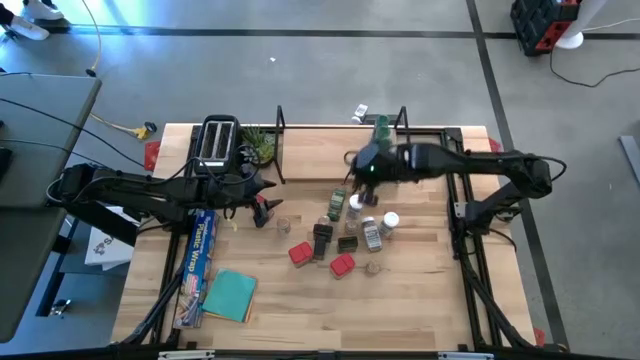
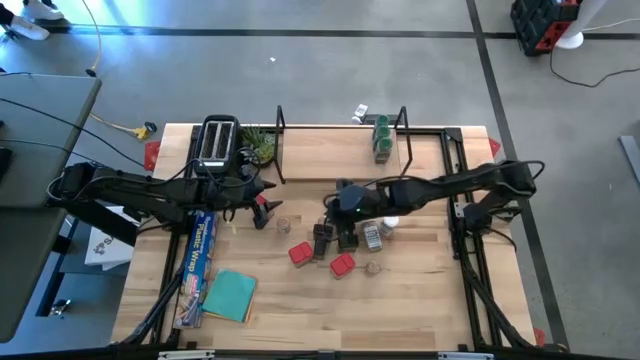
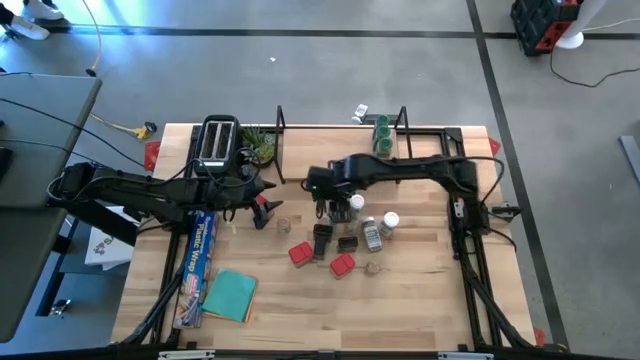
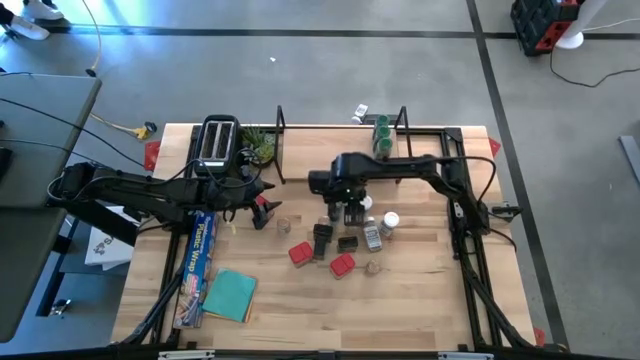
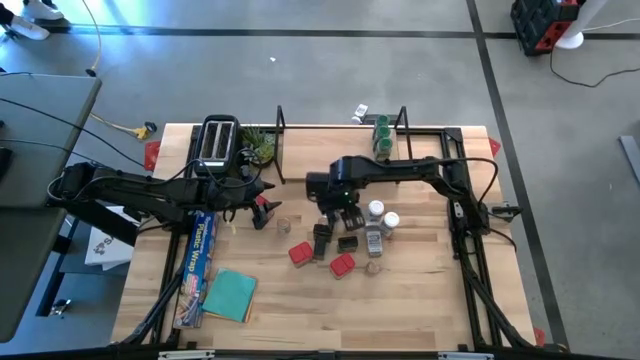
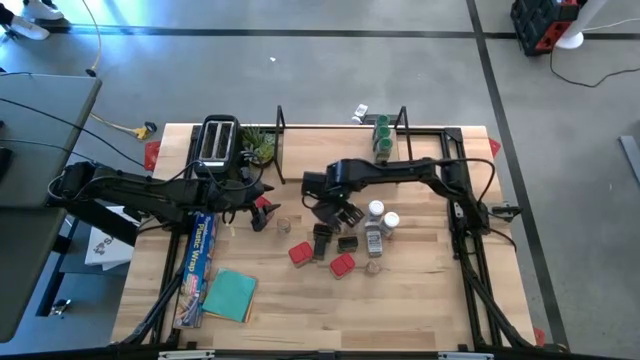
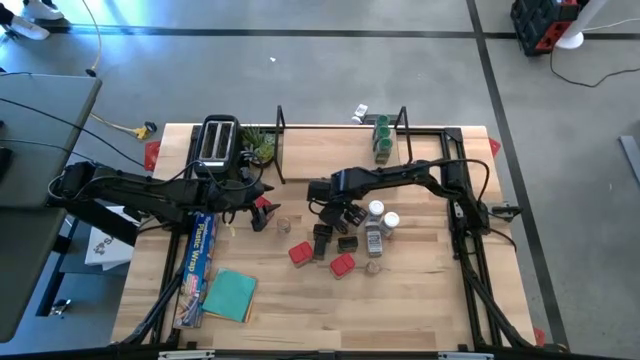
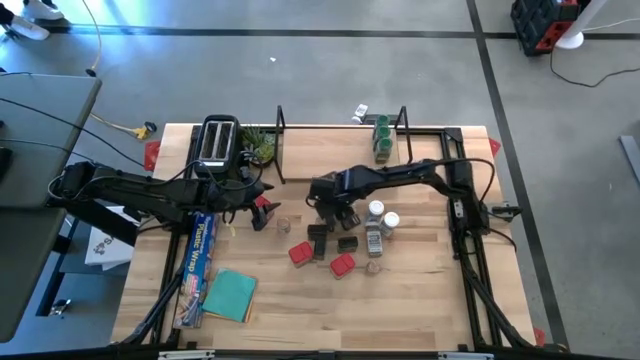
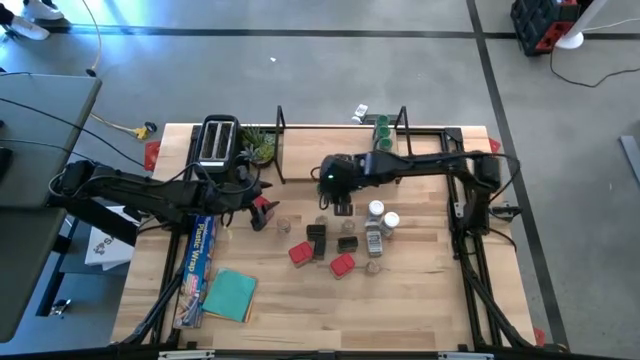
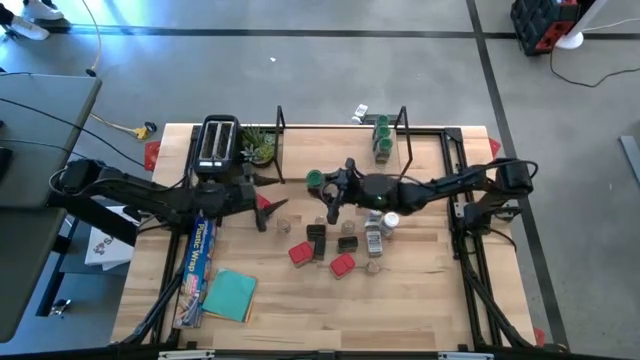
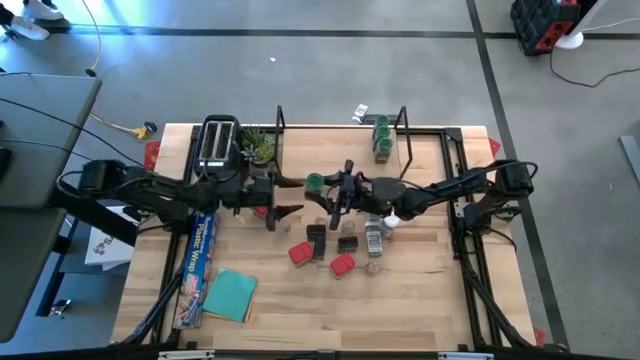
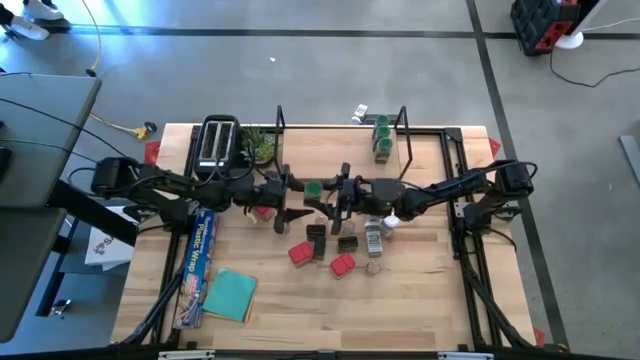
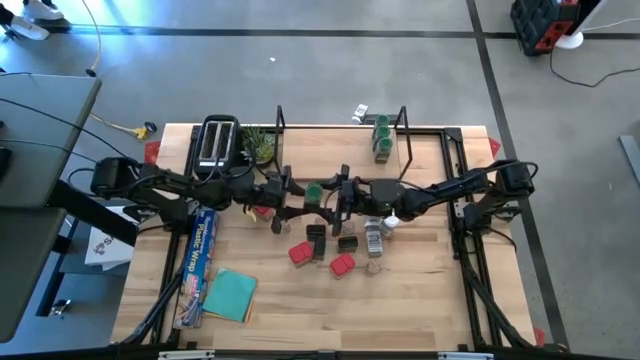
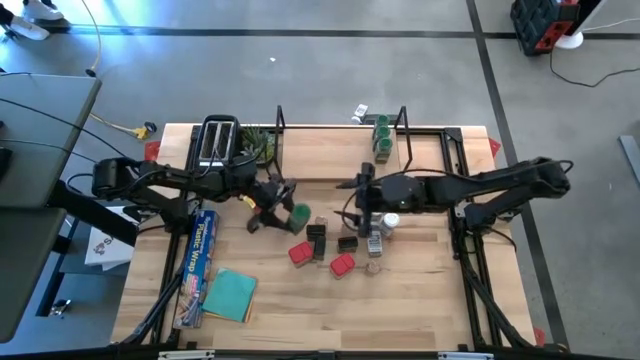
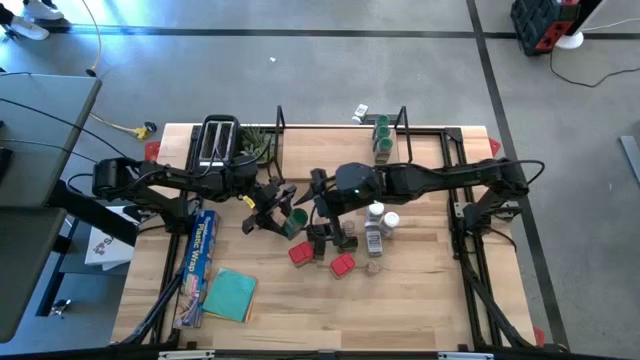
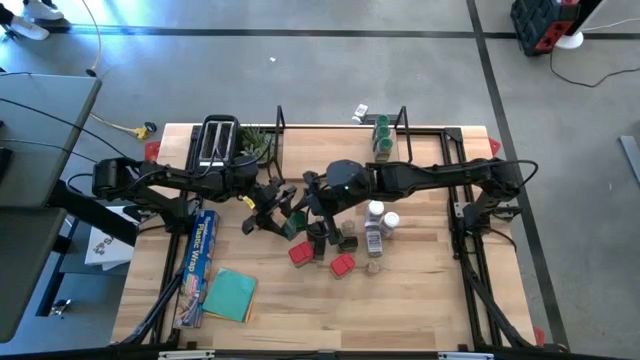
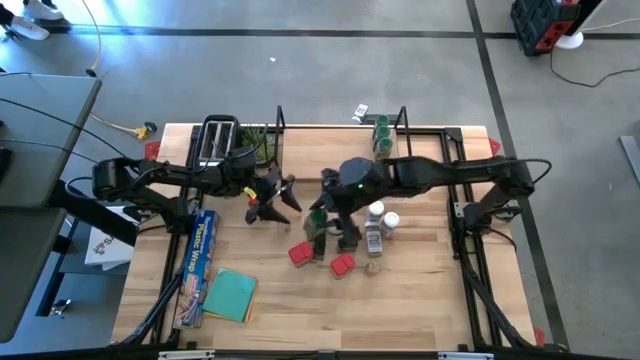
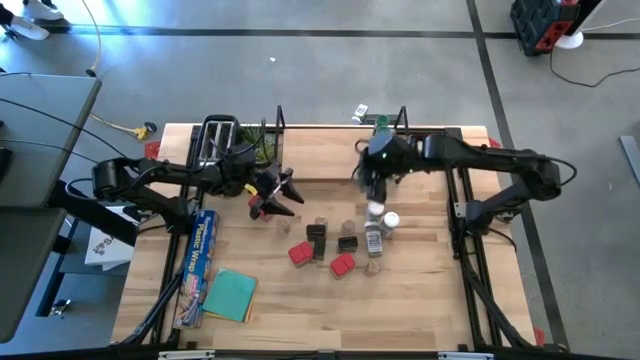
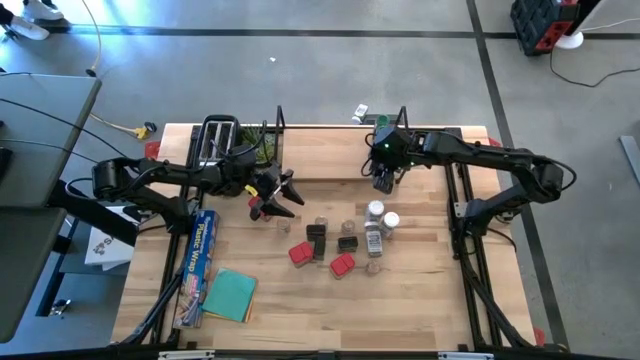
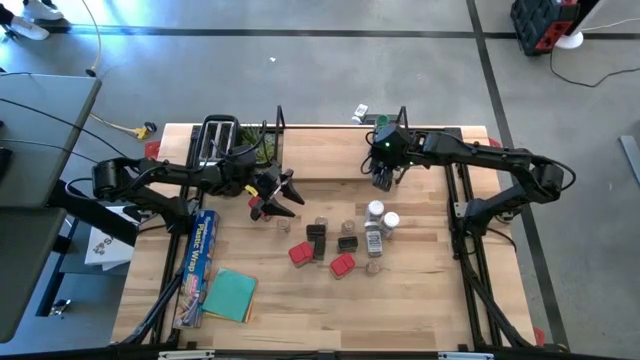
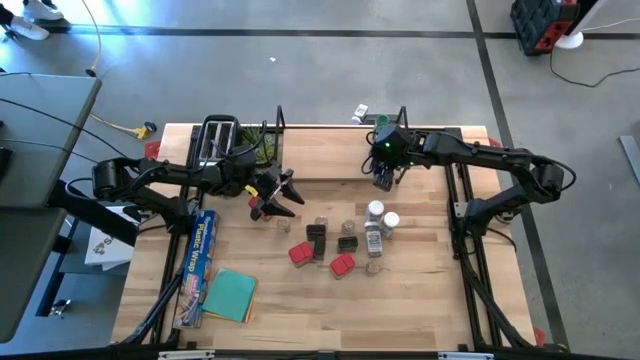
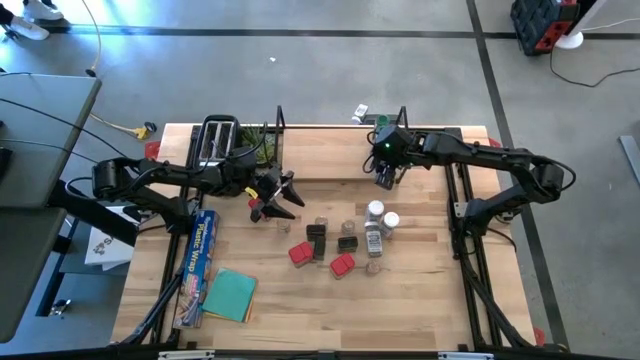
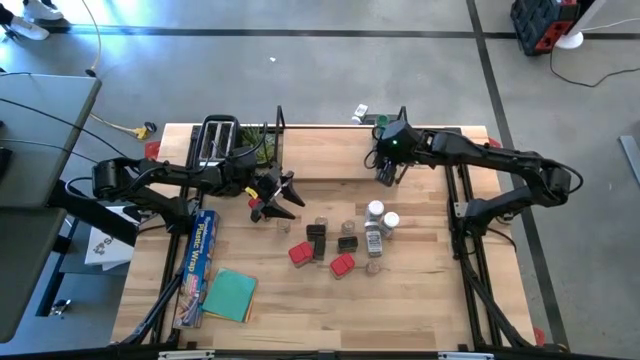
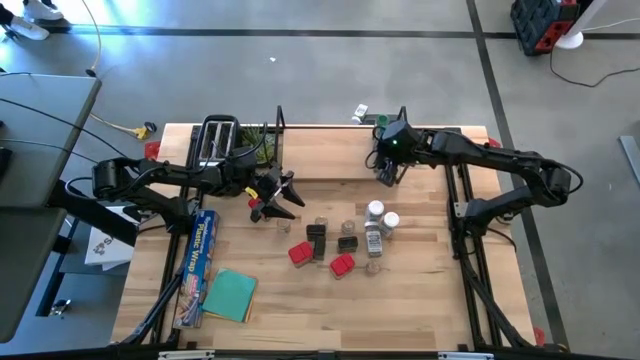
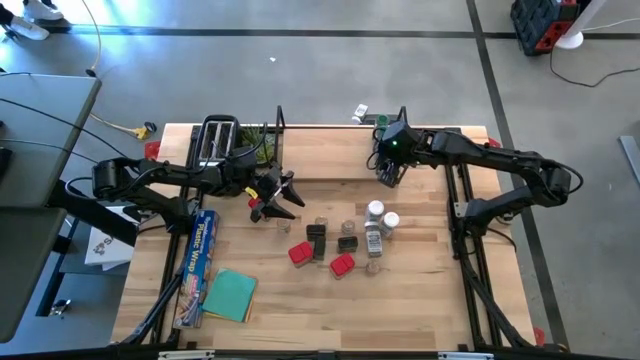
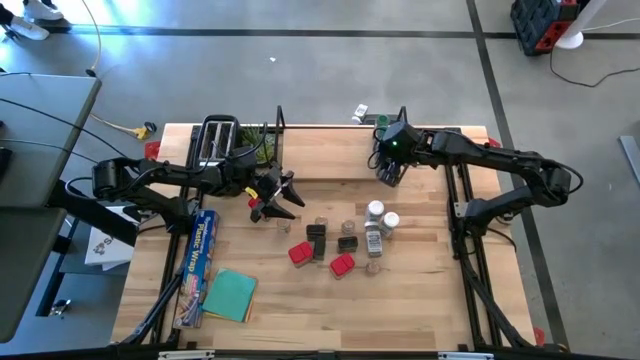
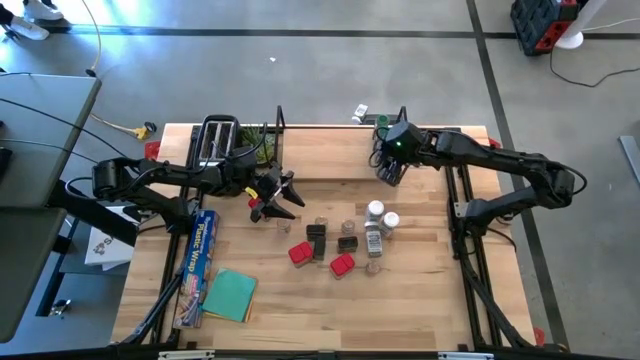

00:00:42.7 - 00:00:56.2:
Task: Shelf spices
Put the green seasoning bottle on the shelf aligned with the other green seasoning bottles

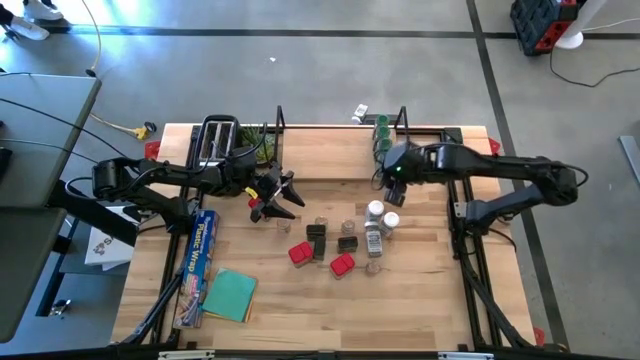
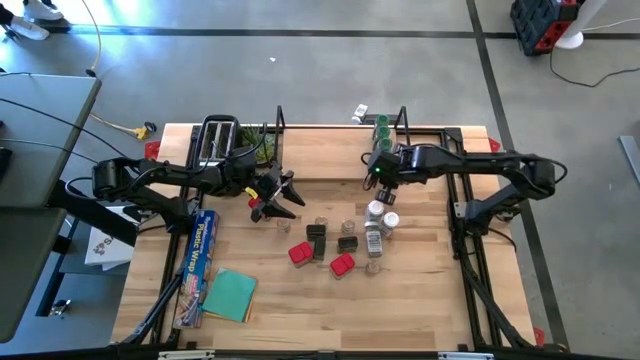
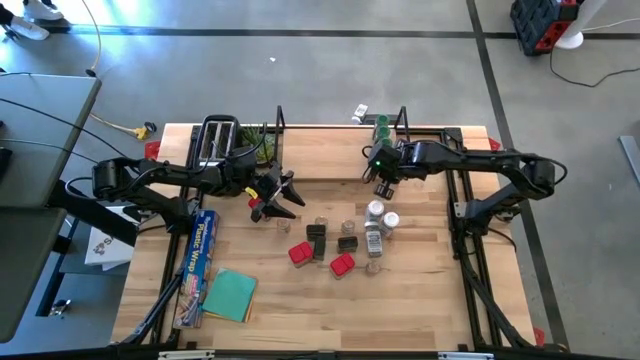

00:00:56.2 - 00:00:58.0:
Adjust the green seasoning bottle

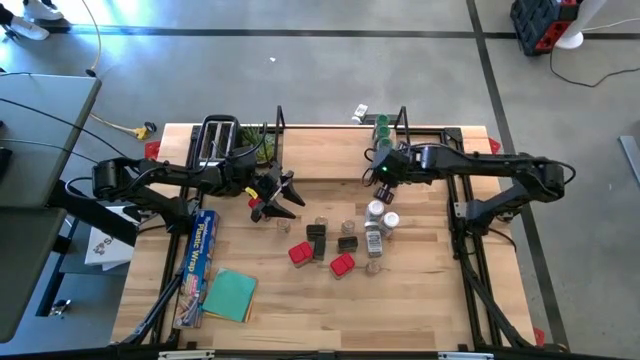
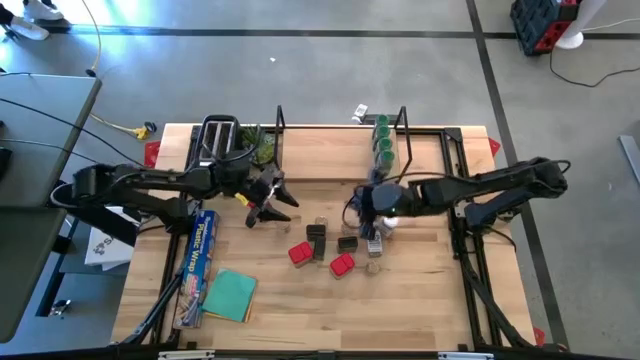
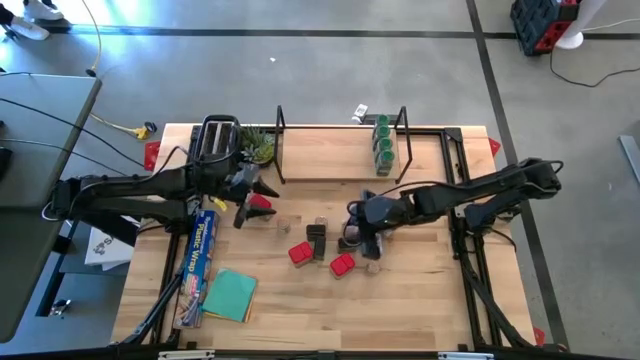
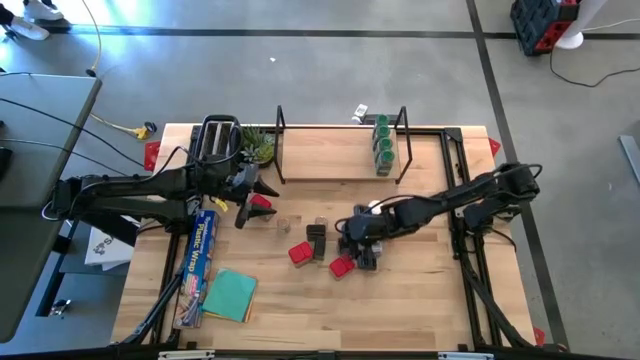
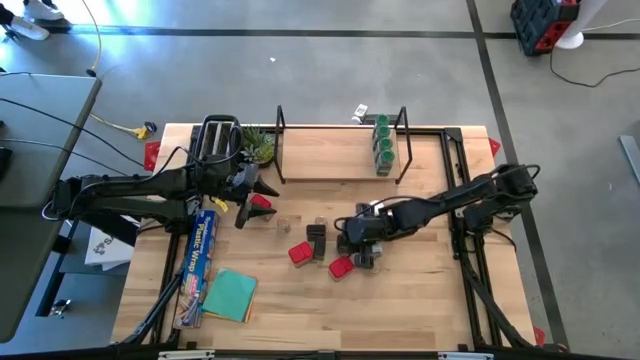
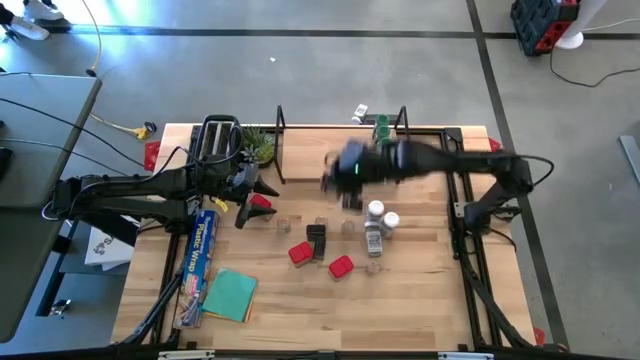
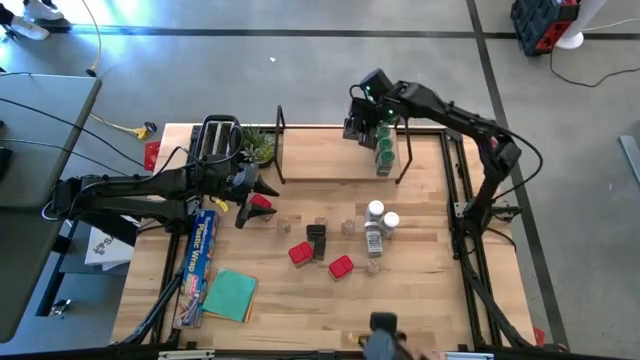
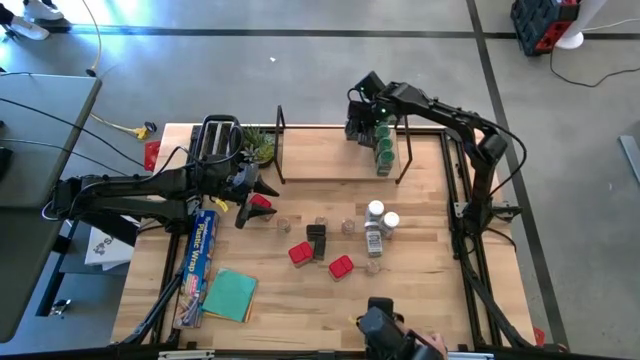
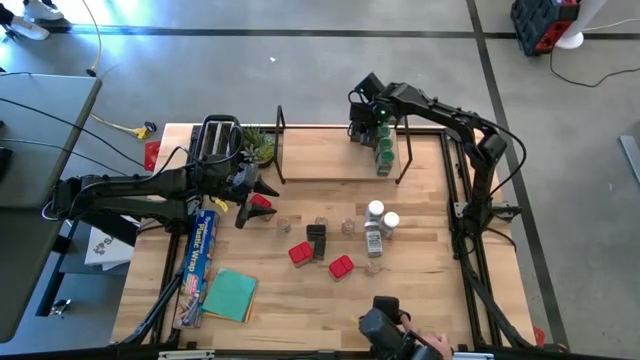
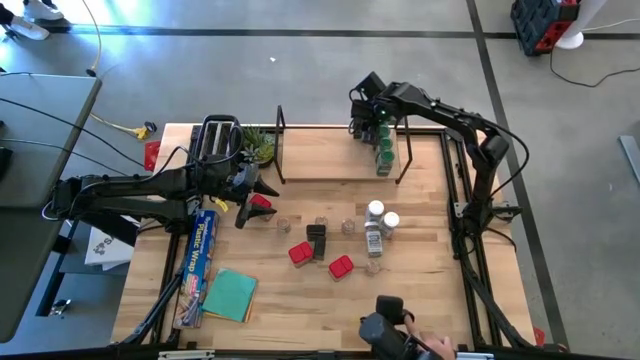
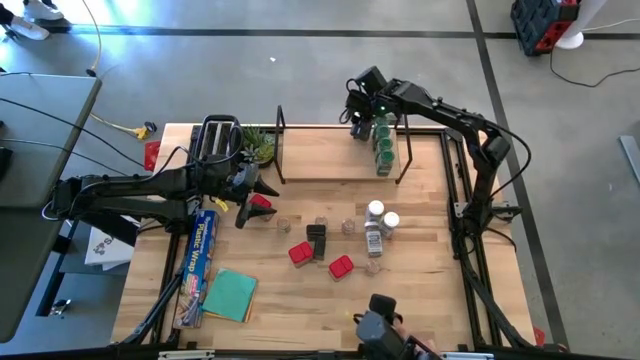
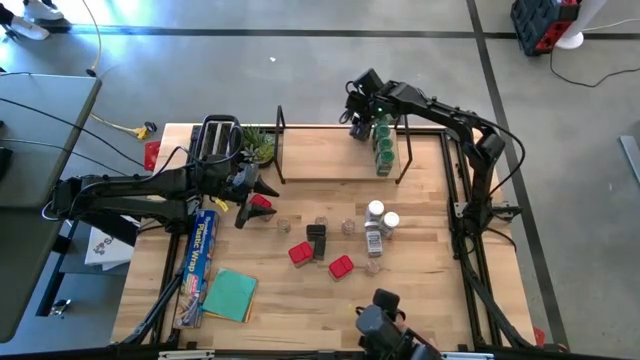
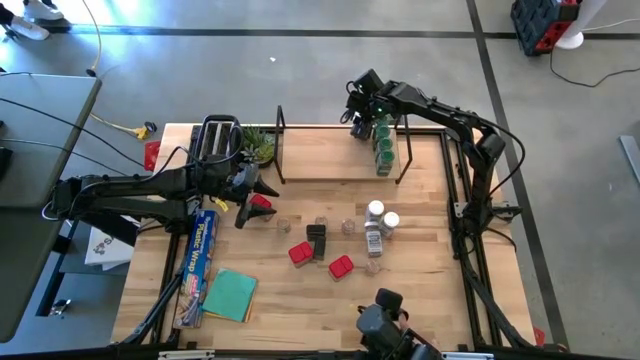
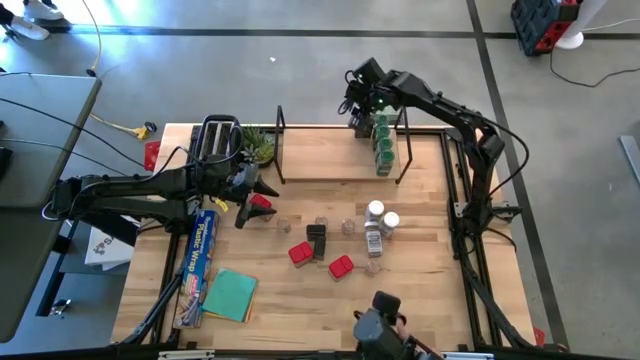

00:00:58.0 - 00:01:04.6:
Put the right black seasoning can on the shelf
